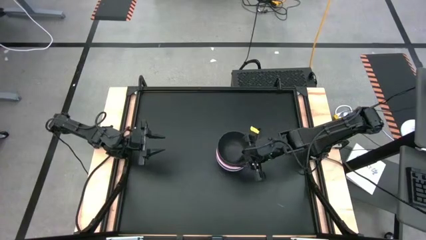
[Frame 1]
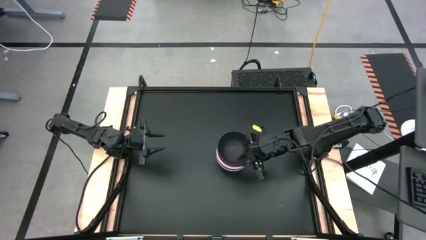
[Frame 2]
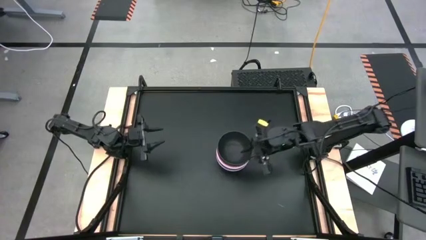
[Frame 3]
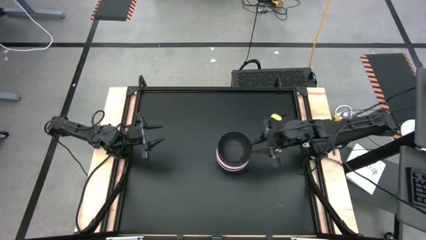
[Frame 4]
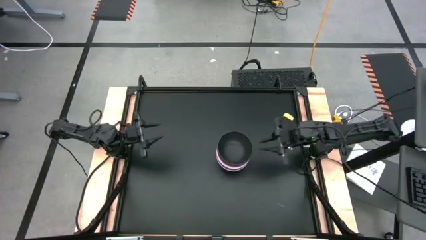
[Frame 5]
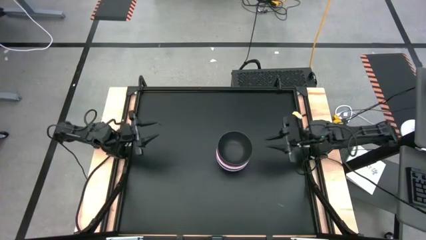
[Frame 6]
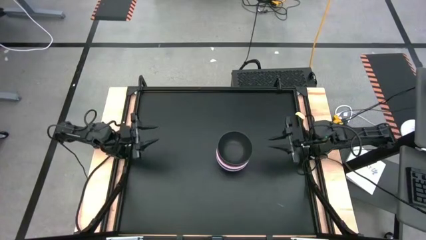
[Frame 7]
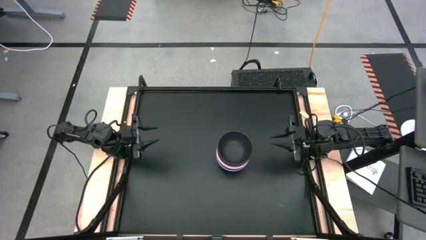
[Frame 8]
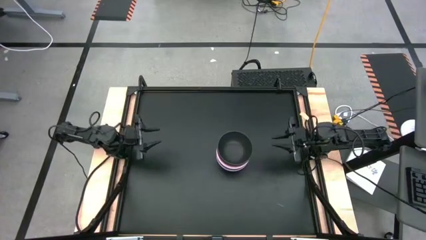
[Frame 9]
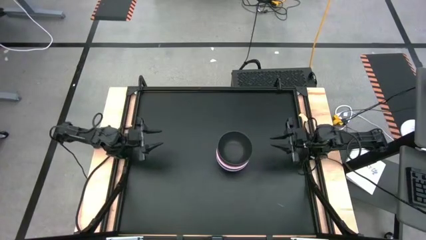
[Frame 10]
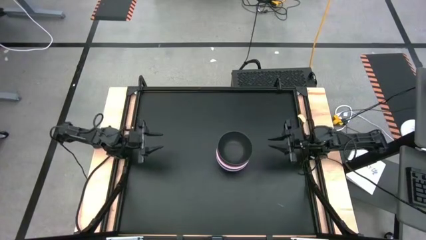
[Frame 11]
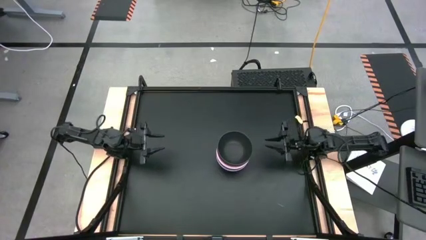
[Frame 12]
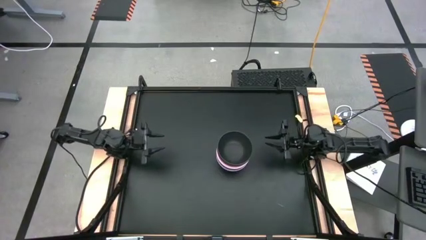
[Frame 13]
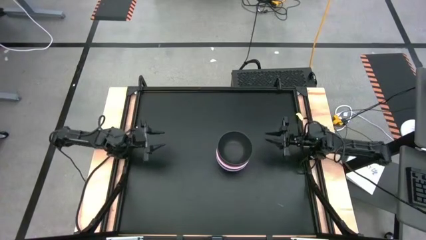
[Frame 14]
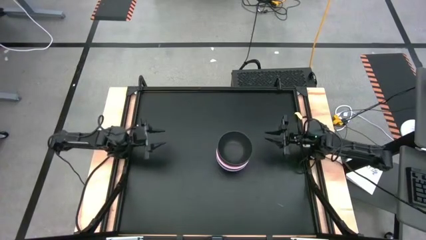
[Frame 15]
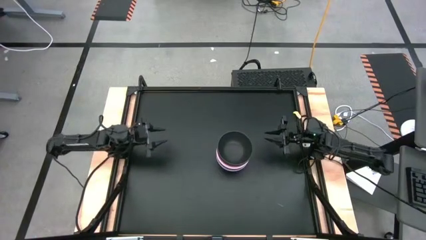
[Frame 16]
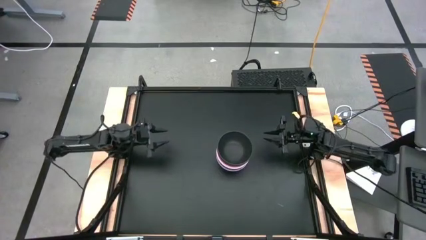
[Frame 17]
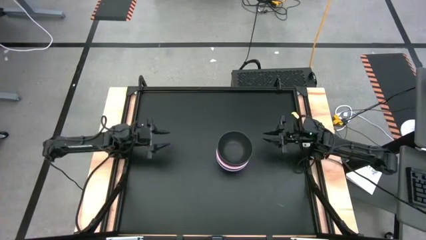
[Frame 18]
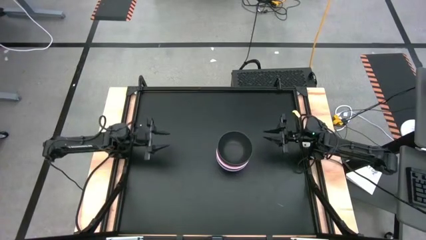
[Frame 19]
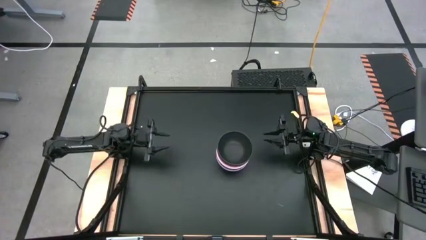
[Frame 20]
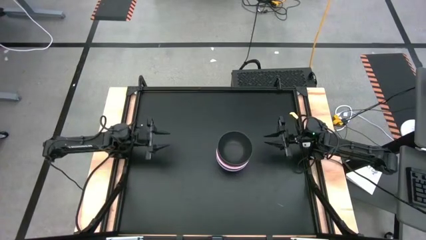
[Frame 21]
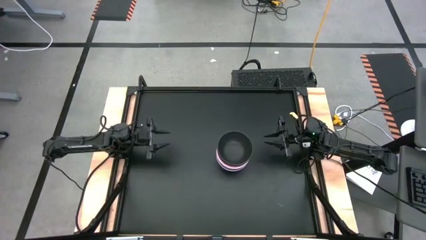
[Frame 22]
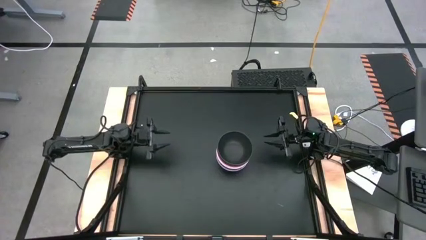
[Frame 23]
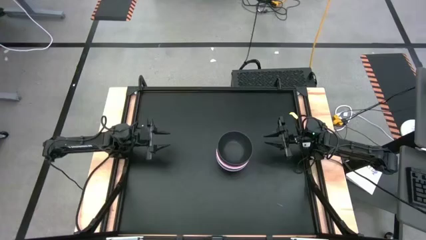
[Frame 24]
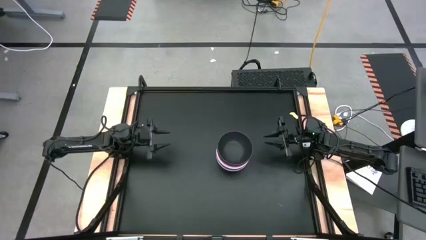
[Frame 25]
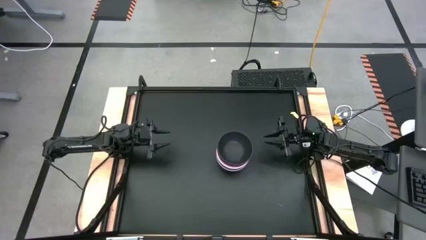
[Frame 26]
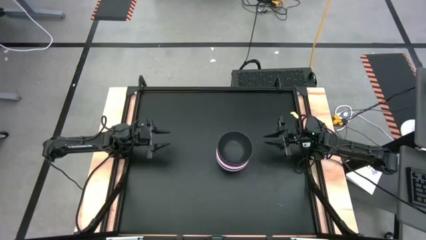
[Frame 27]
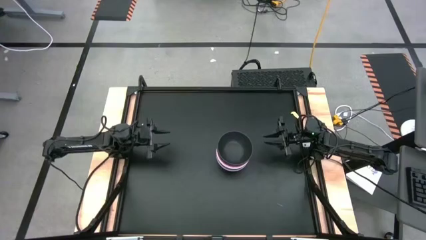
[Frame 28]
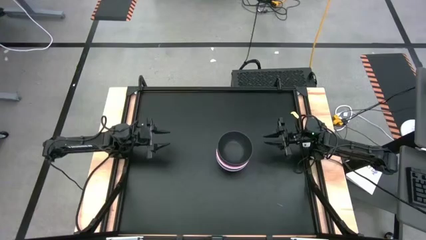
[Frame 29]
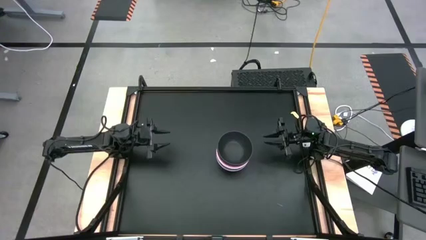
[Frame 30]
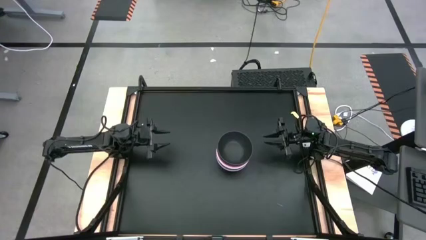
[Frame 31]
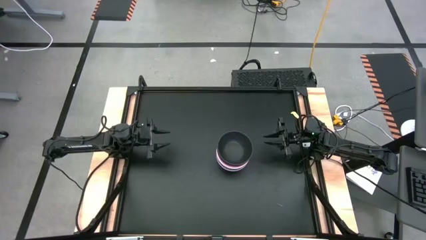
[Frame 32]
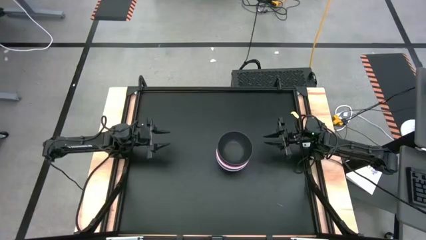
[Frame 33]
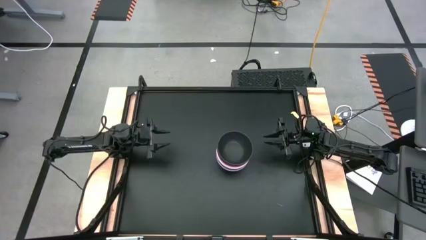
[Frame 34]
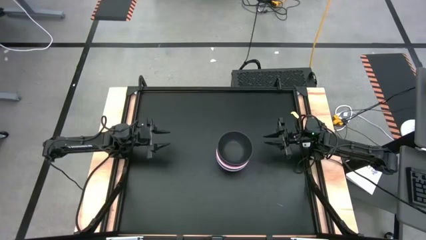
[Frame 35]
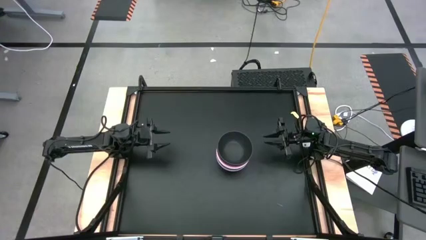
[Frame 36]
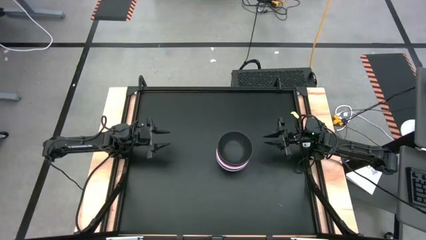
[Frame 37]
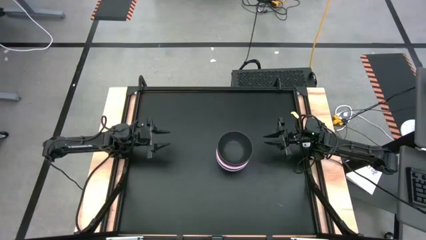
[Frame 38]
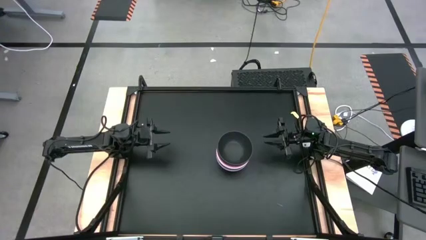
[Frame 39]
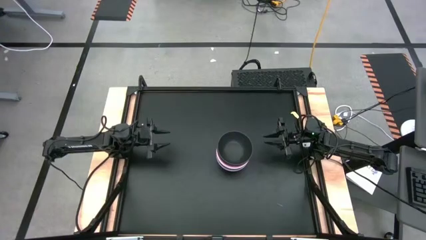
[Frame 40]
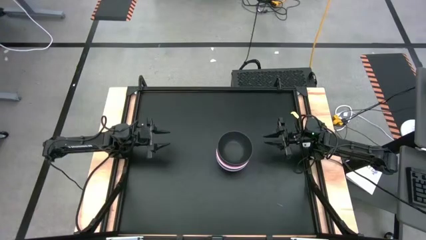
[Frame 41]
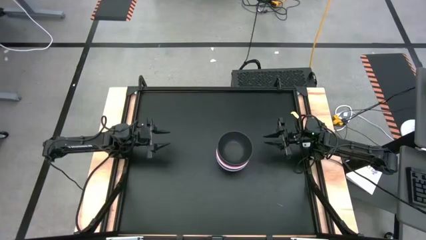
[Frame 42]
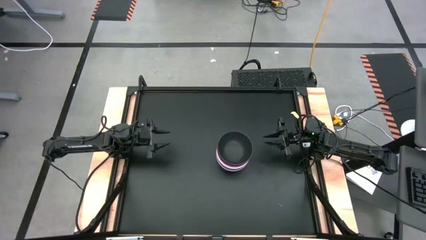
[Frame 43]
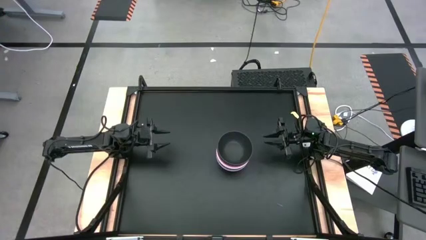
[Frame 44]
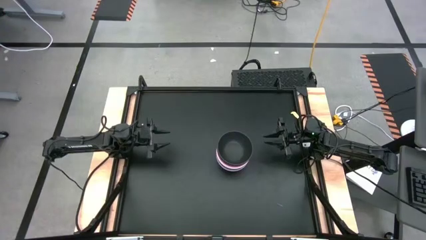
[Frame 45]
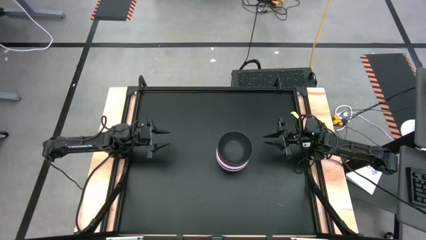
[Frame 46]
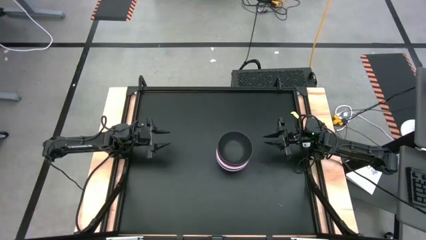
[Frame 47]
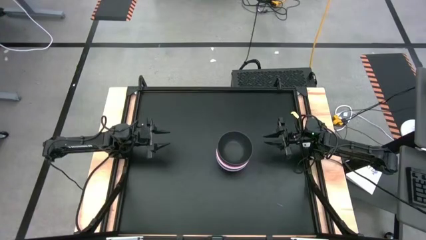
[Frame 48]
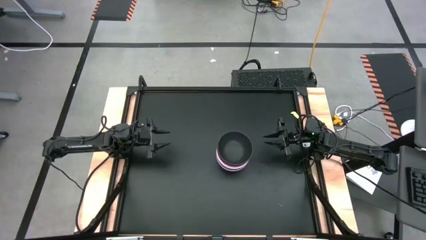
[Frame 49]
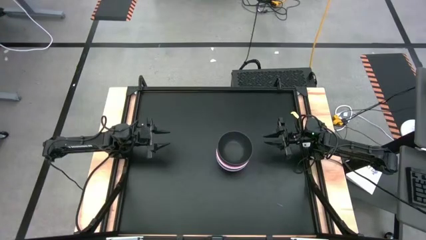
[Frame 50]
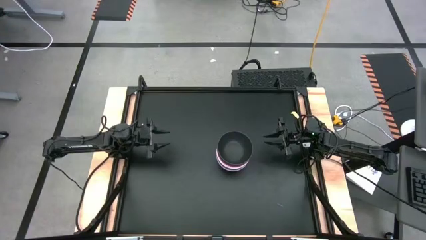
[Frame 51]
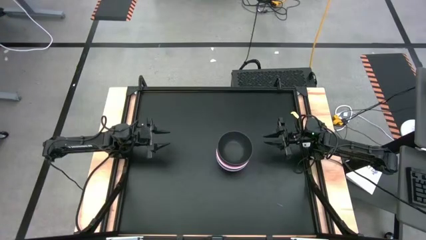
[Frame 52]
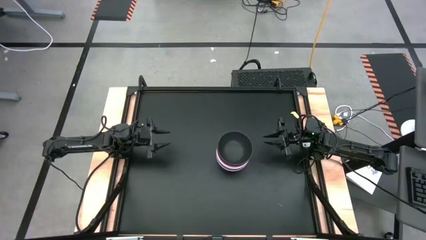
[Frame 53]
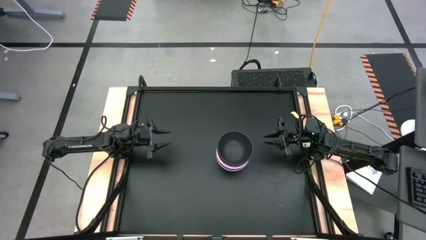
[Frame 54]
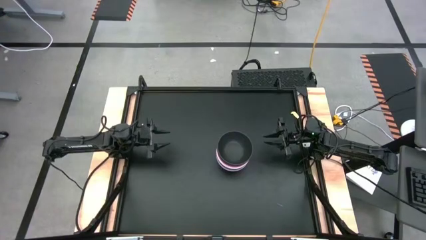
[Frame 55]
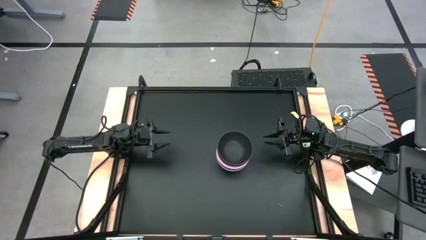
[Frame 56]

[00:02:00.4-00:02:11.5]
Task: Nest bowls inside each other
Return to Home Position

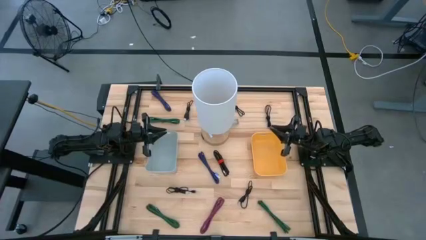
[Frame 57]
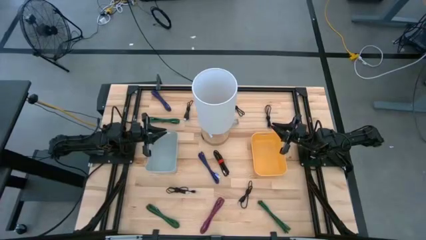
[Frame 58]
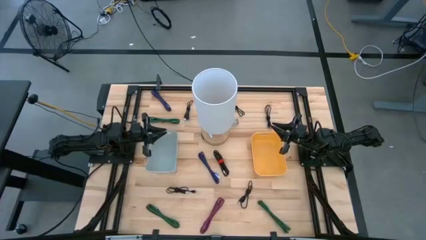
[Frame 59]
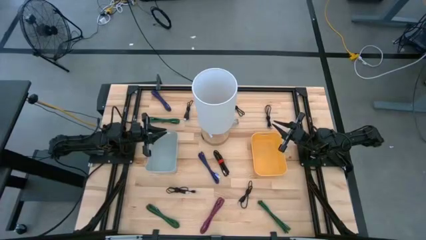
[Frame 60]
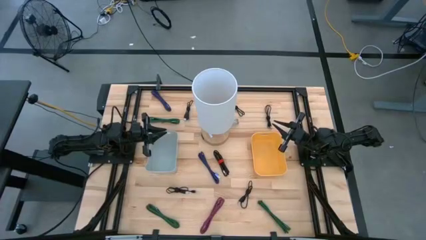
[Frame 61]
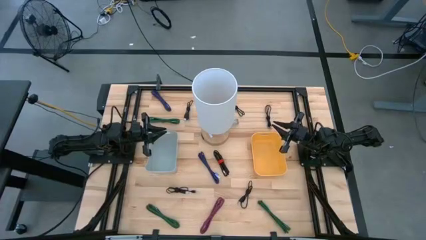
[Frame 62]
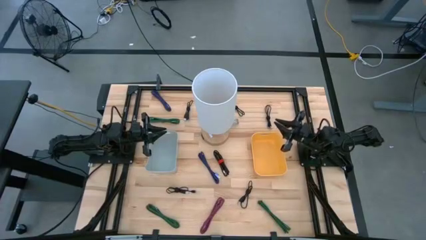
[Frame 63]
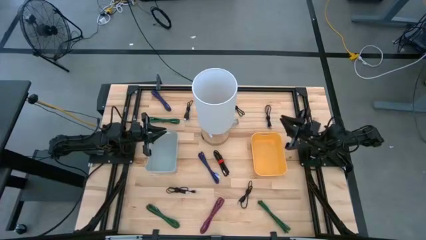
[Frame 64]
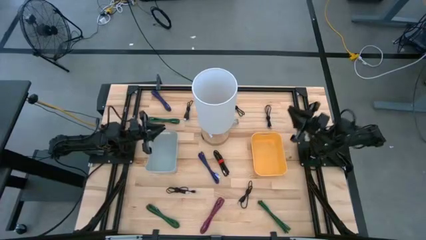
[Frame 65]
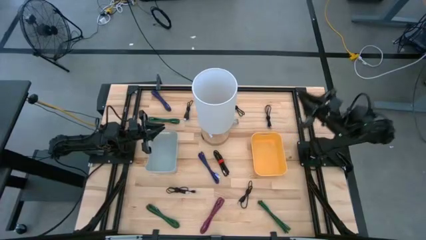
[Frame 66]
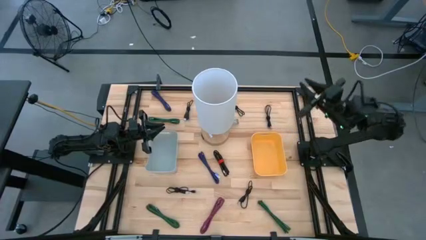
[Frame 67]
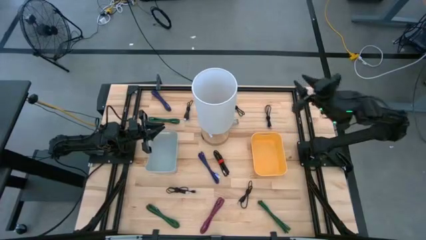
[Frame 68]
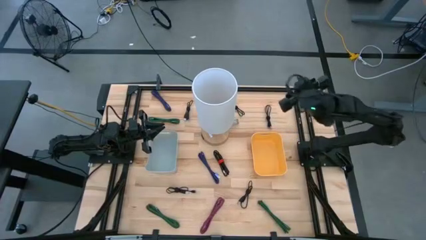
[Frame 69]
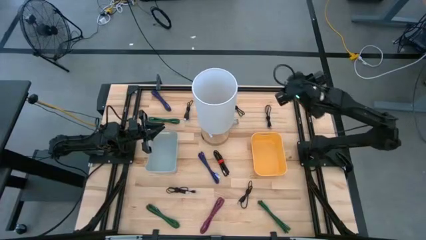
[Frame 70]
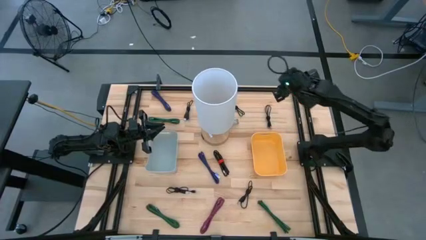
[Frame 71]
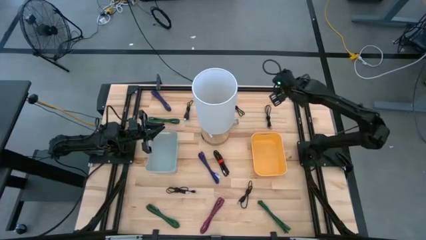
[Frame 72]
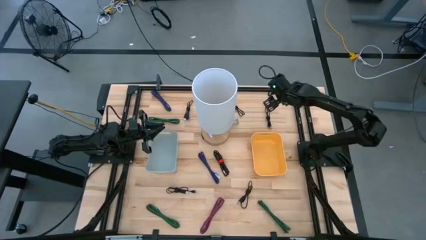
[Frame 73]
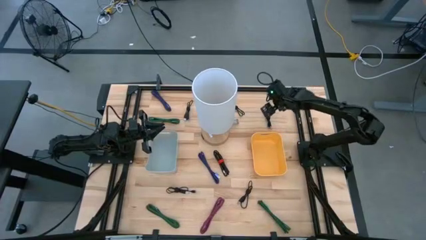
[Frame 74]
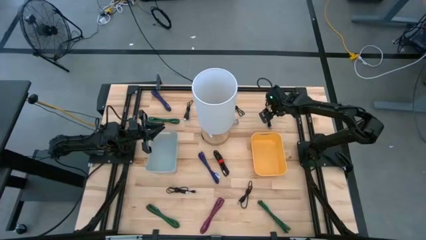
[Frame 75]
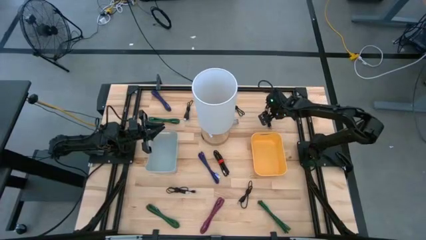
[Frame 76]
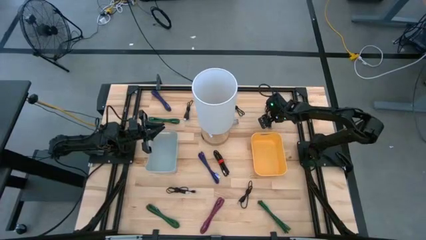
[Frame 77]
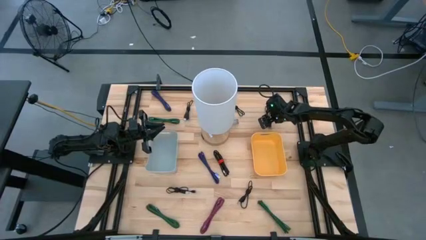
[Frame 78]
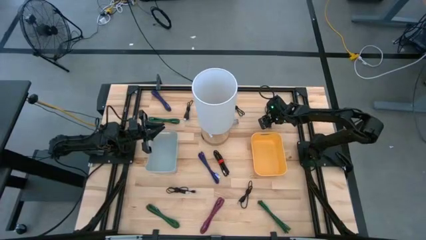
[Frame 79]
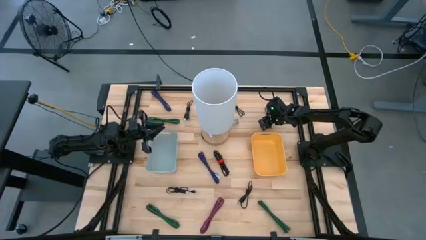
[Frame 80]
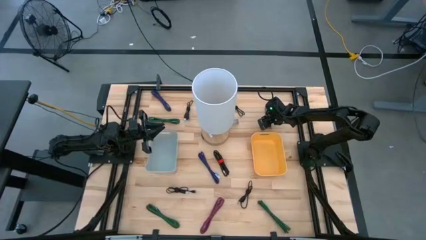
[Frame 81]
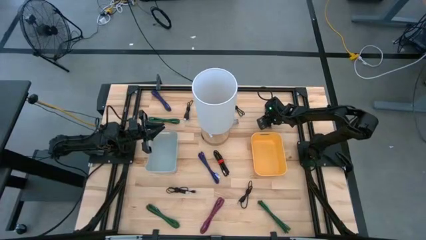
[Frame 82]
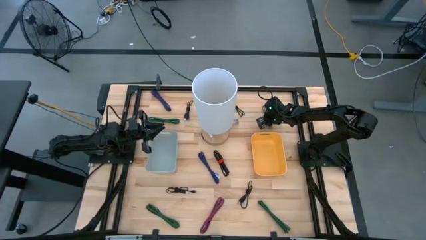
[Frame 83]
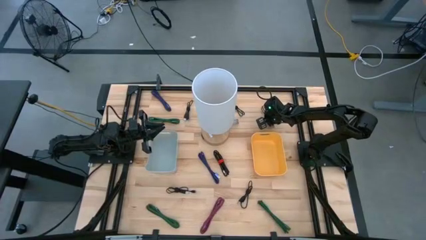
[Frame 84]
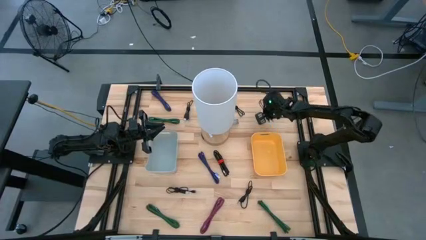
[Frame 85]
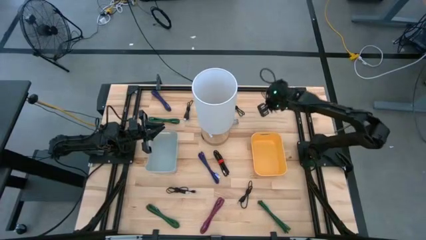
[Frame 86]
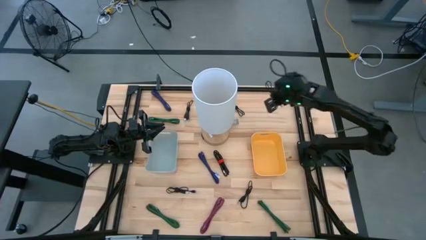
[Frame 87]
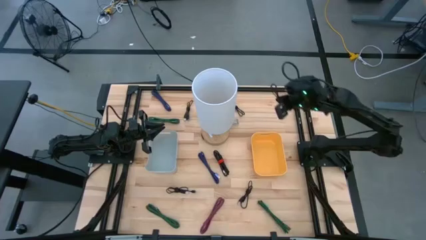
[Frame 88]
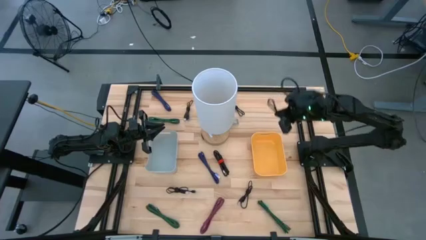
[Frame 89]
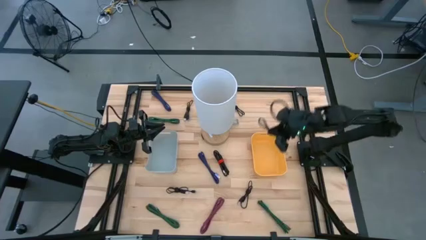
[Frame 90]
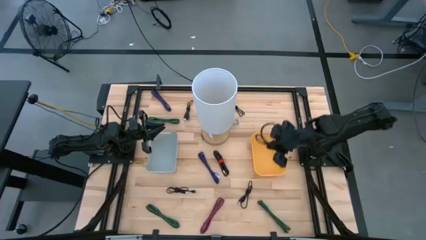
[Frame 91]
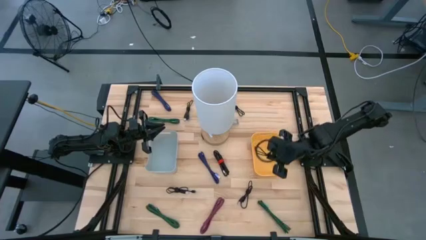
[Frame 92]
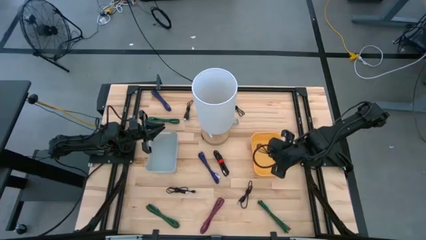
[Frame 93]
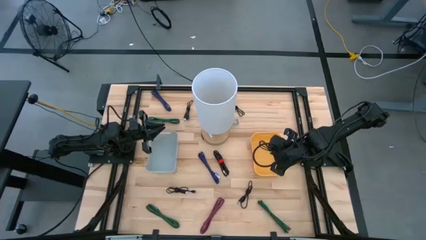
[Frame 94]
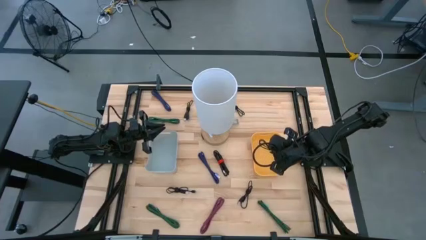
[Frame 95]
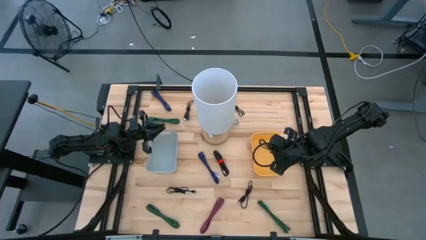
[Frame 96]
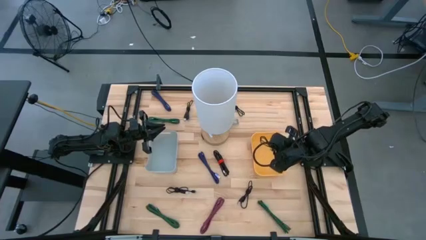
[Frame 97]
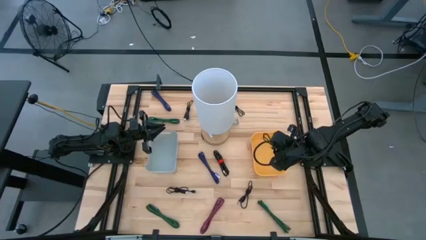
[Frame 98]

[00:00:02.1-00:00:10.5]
Task: Pick & Place USB Port
Put the black USB charger into the yellow bin
